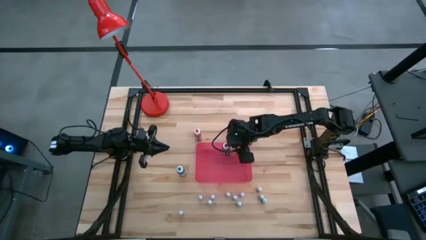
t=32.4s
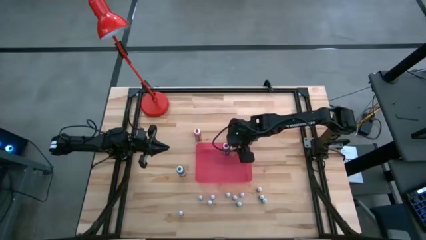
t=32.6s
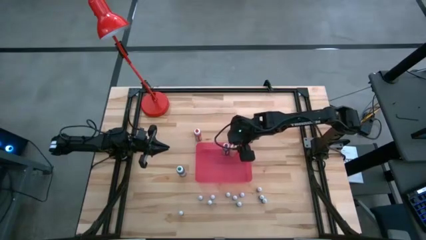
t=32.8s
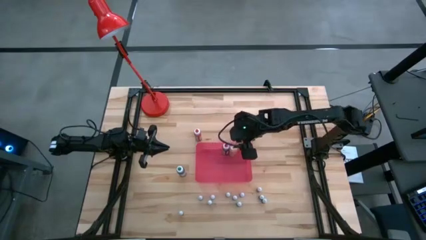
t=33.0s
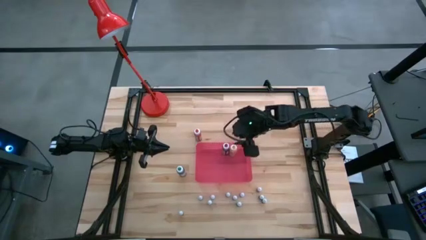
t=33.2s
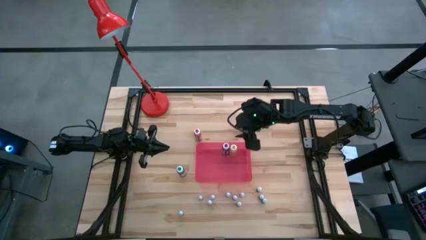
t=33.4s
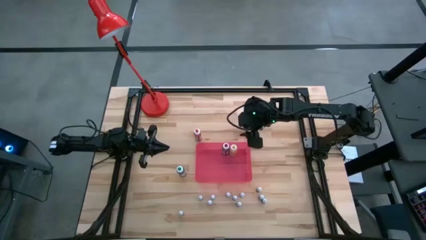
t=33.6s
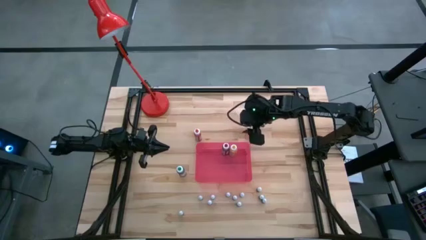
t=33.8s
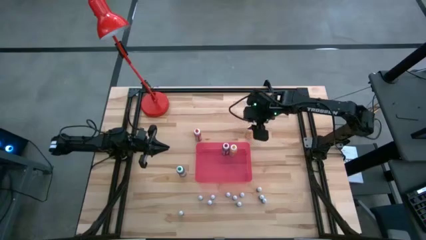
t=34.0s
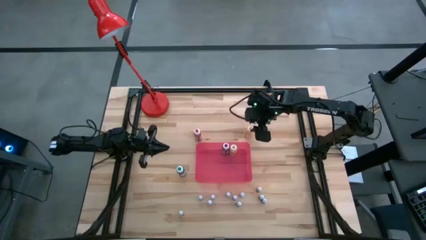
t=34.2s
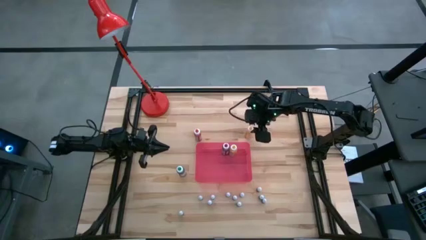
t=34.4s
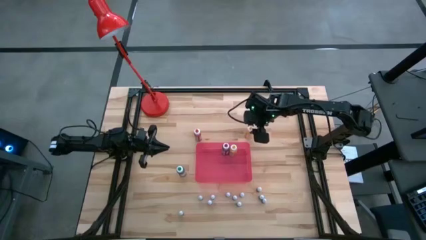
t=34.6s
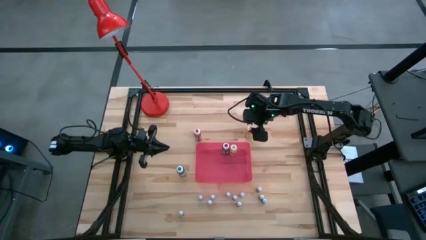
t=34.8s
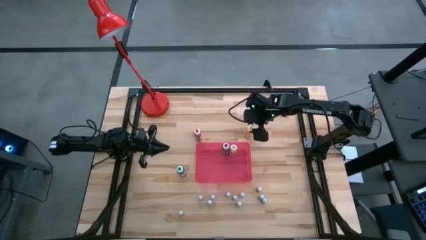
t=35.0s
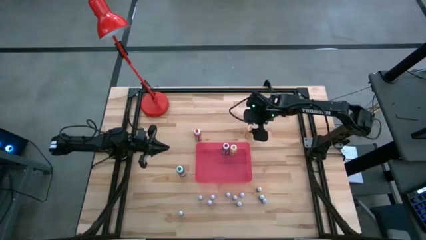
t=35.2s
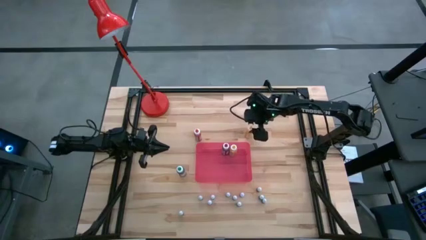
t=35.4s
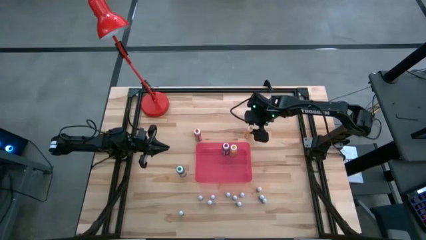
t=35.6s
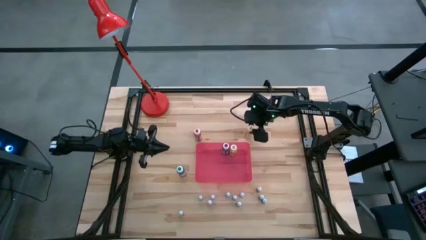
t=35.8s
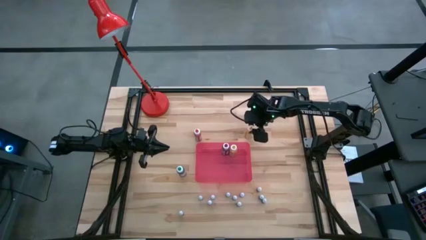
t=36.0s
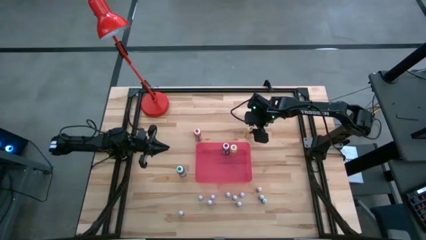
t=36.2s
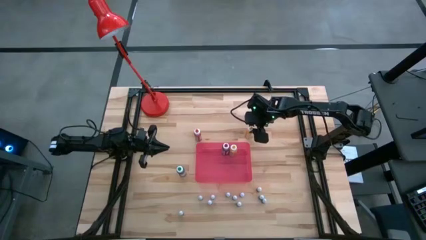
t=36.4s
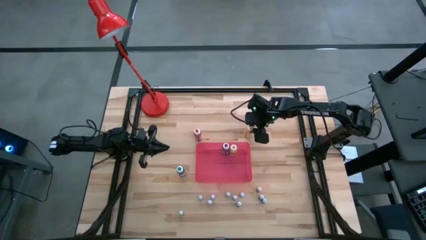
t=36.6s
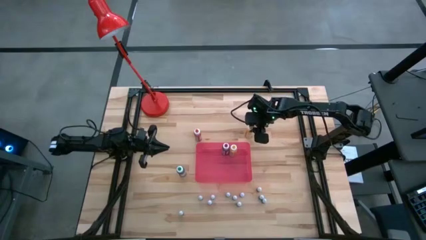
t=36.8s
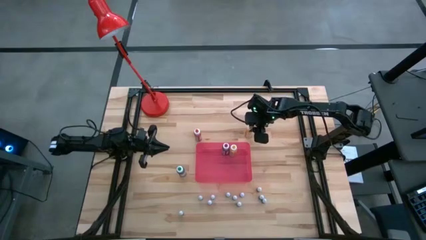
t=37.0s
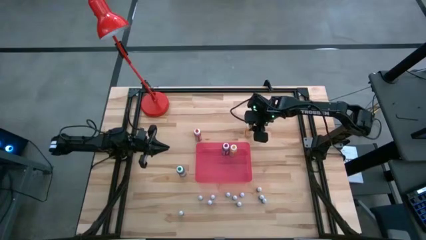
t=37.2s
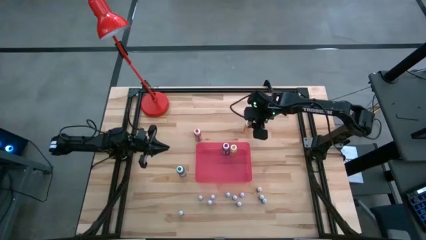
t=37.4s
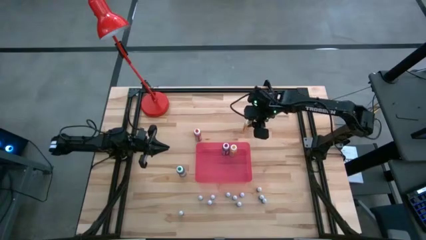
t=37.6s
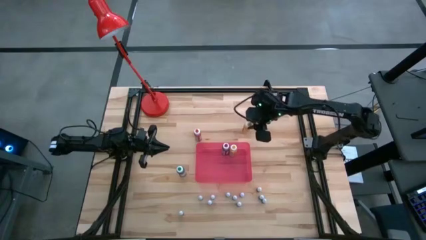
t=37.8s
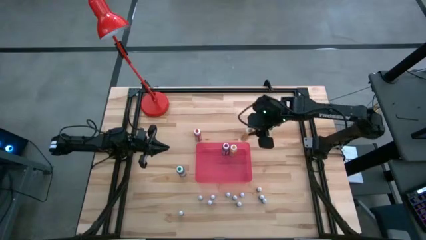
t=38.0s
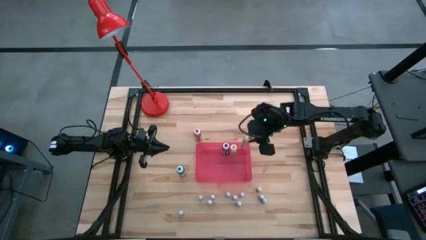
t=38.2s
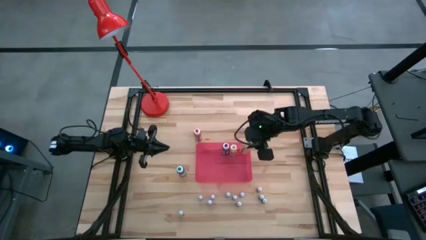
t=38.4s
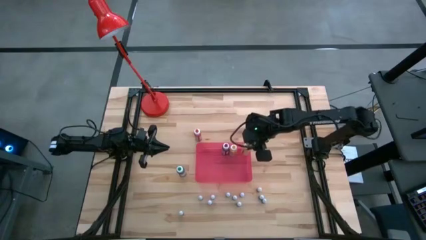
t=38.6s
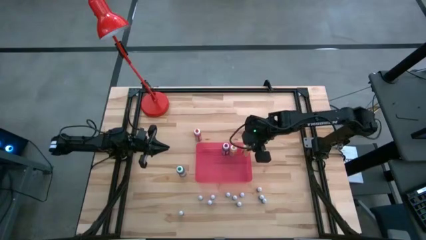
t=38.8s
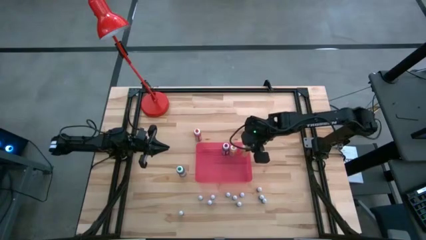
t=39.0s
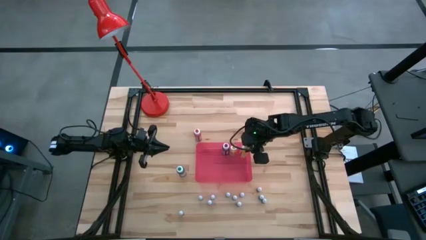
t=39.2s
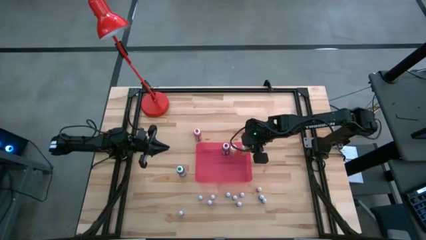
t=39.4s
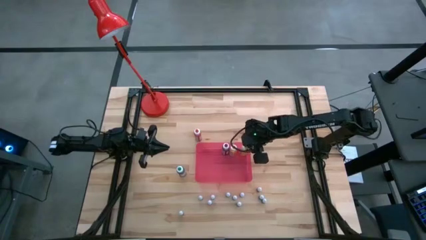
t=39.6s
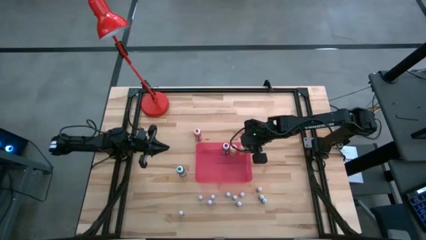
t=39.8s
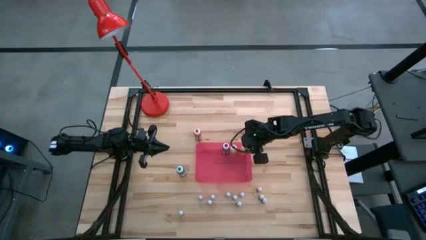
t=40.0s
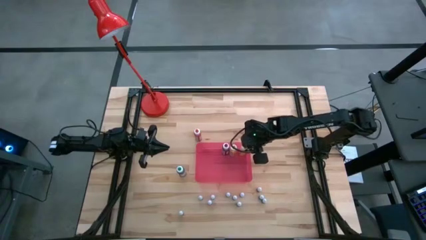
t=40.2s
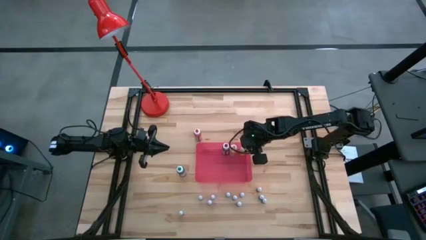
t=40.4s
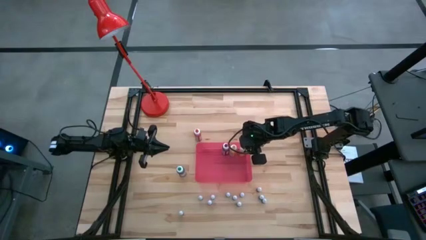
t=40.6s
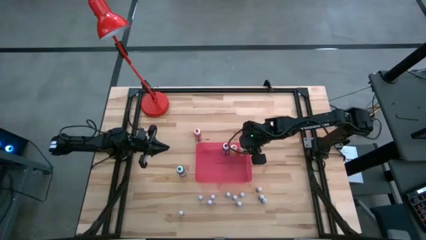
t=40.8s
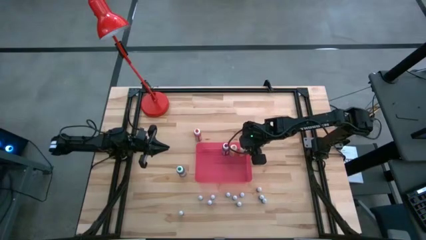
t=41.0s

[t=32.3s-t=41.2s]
Task: Pick & Place food coloring
Put the large yellow food coloring bottle into the container

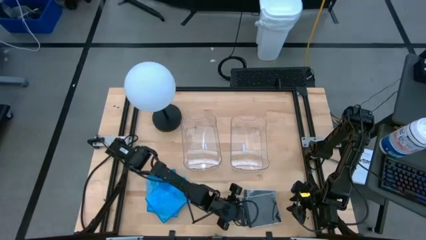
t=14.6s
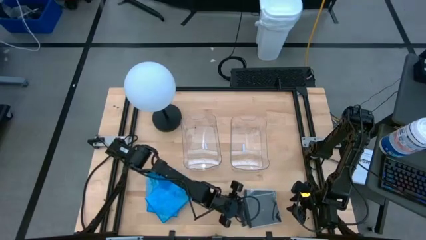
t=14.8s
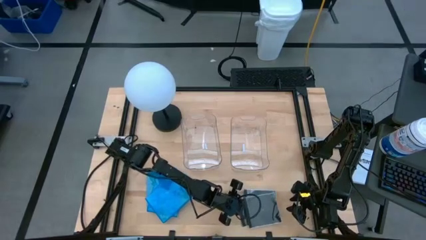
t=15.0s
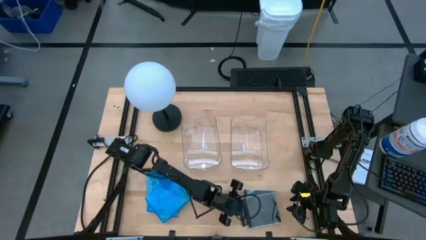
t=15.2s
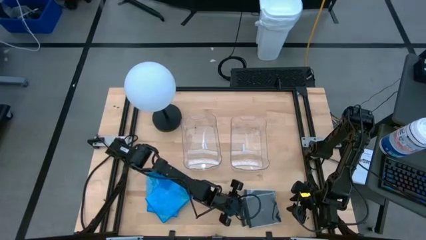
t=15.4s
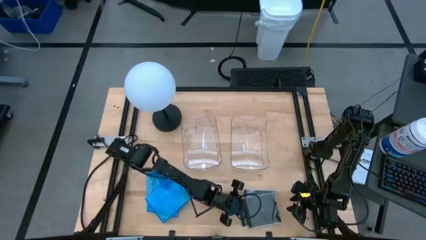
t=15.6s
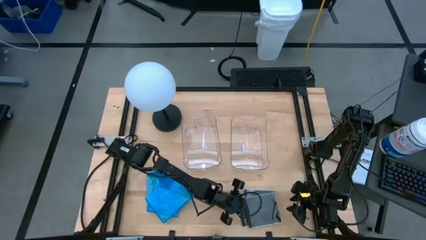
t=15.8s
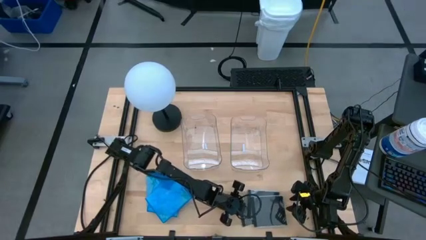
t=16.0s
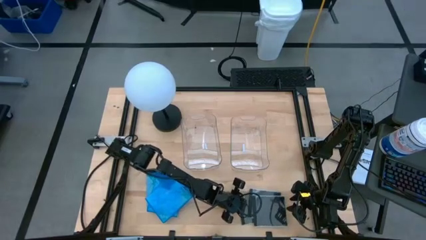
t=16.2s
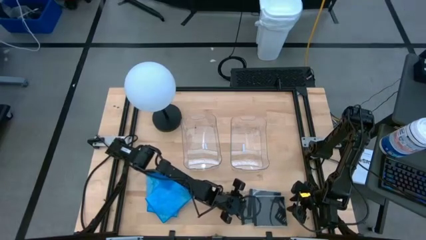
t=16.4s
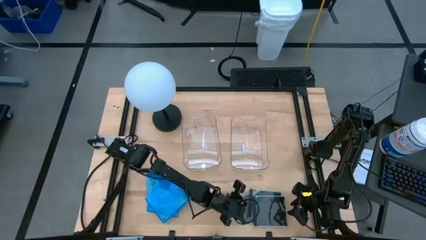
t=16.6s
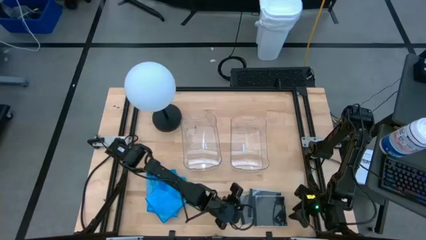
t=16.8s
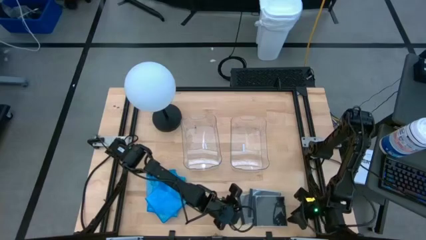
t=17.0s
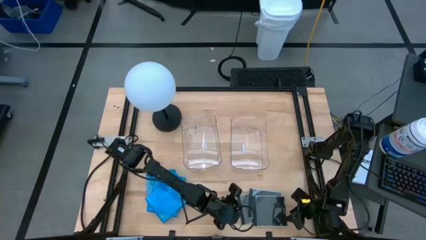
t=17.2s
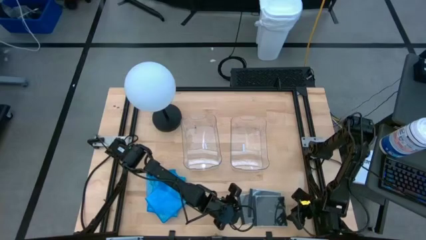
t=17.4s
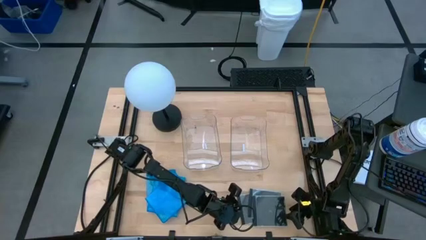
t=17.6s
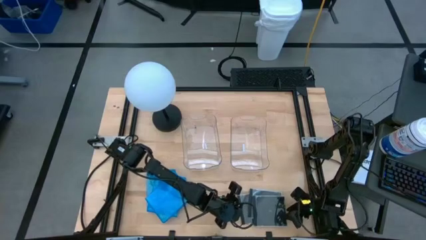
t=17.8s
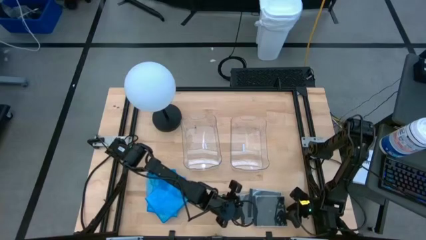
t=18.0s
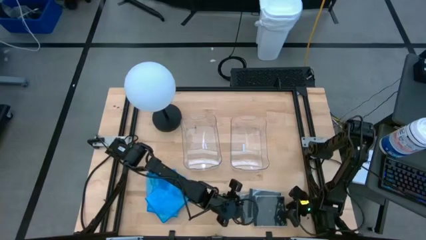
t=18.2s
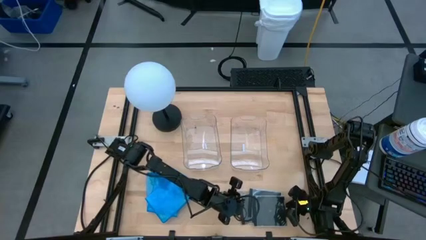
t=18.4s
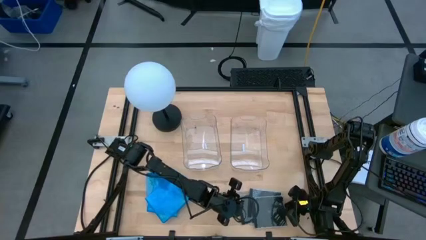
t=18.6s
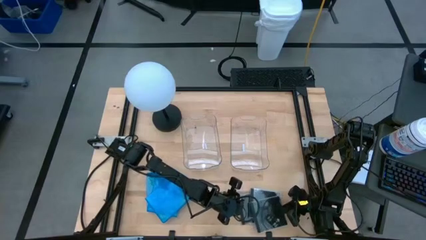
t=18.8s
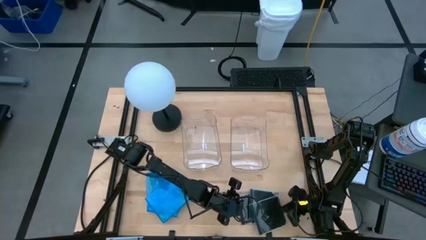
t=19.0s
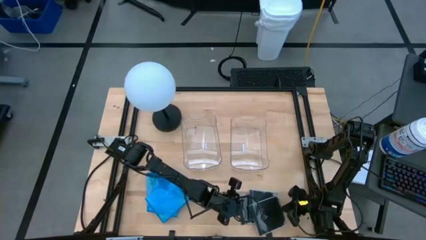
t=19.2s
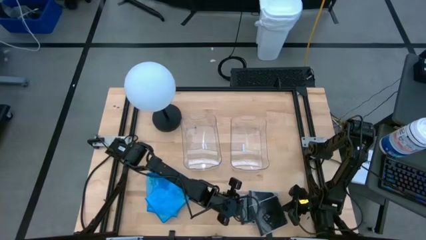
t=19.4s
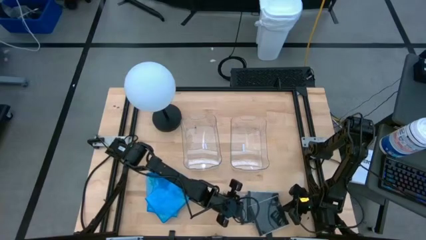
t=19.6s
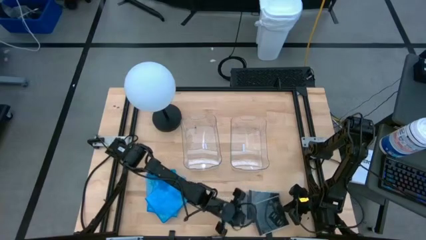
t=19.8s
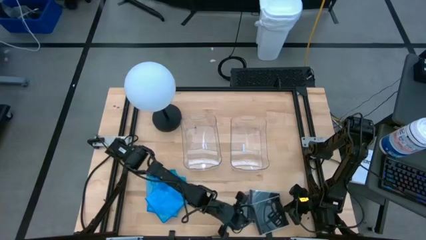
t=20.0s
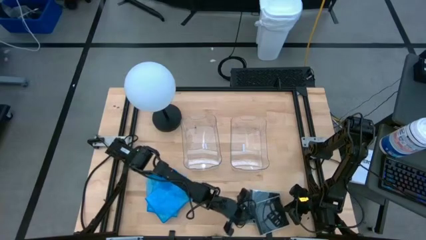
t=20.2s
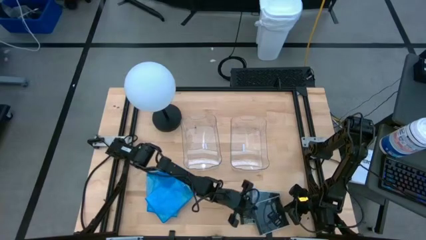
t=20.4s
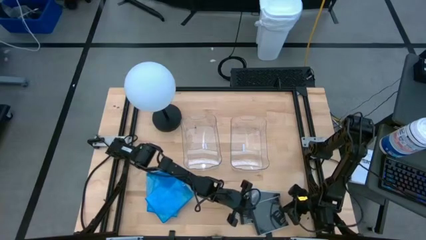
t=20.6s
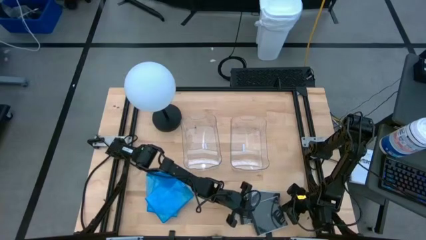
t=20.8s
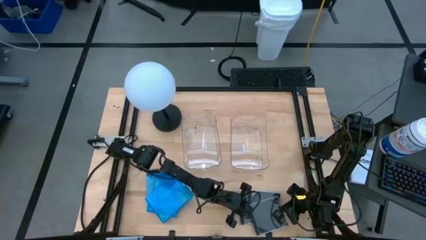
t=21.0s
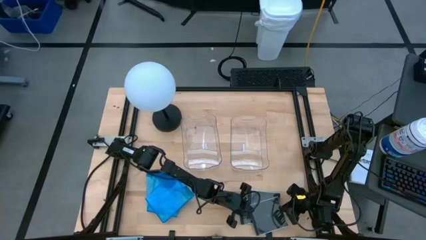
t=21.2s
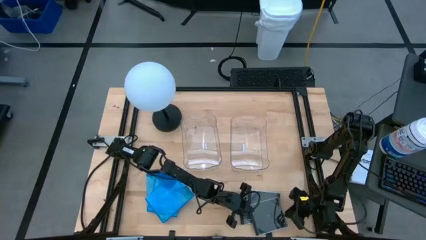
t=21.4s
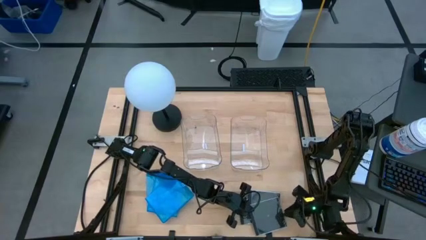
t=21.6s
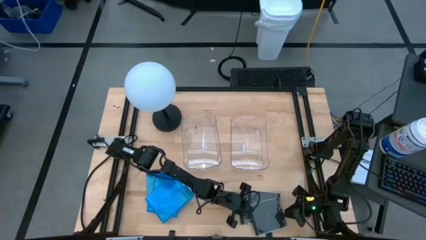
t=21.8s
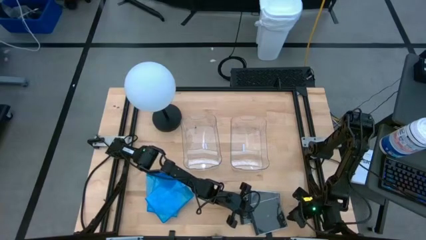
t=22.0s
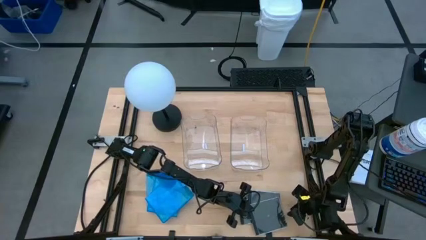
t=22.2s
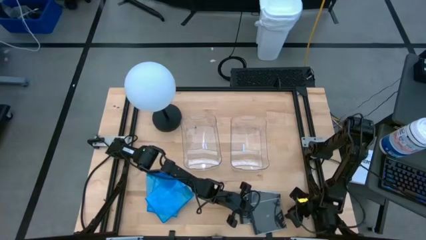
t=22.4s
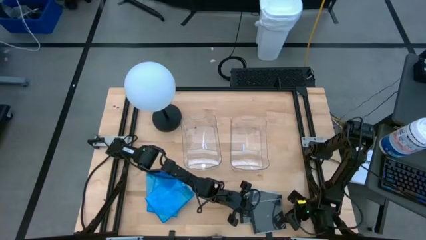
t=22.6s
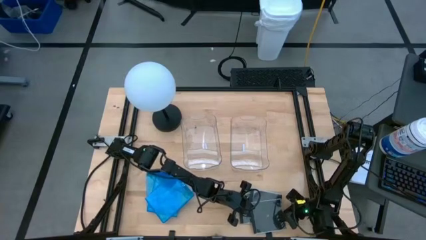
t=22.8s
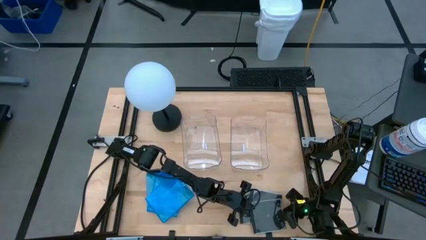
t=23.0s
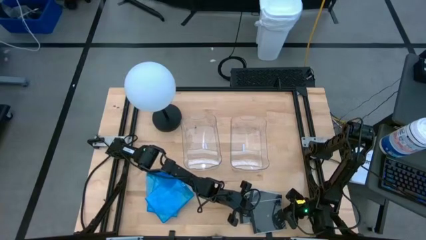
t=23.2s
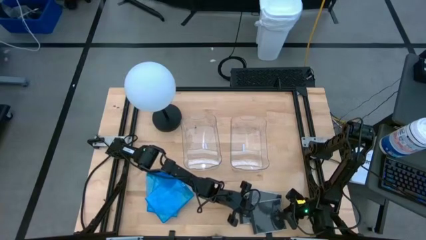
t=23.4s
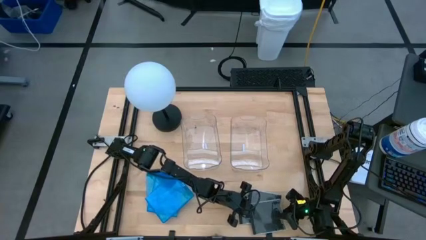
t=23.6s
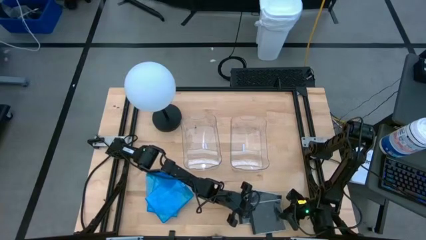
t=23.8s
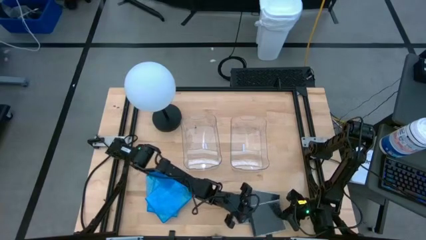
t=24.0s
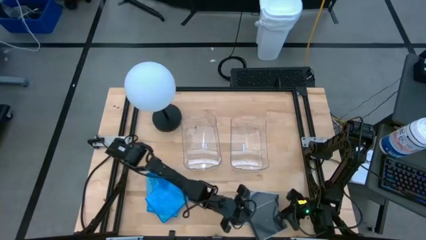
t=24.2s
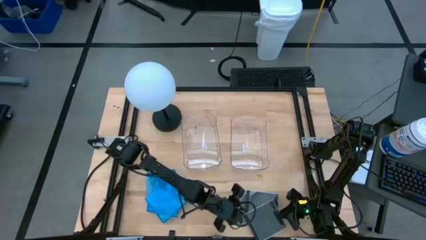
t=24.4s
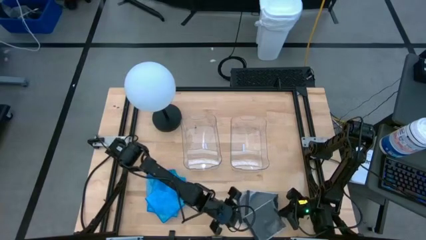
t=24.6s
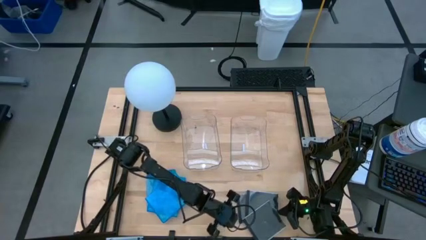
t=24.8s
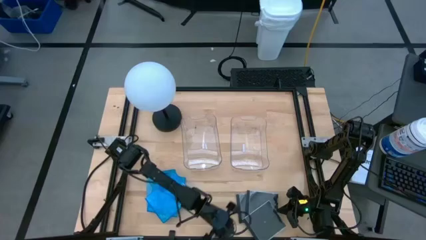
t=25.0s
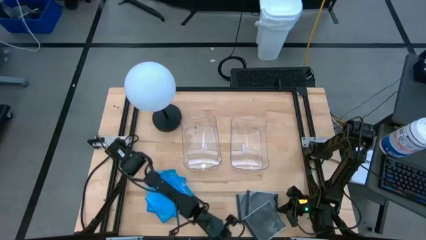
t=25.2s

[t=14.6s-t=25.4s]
Task: Pick & place jewel cases by type
Put the black CD case into the right transparent bin
